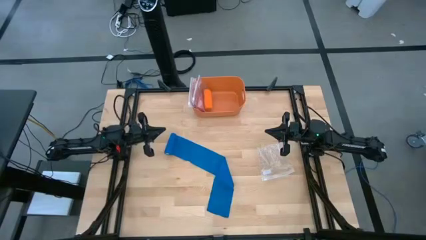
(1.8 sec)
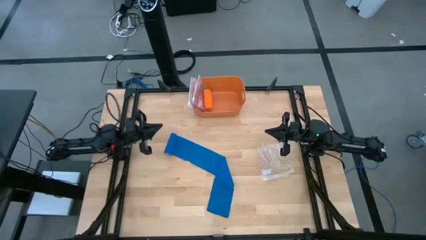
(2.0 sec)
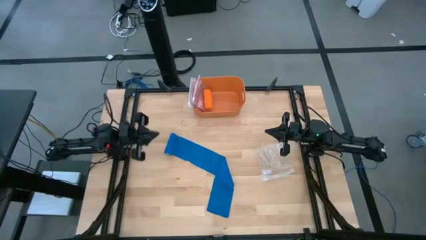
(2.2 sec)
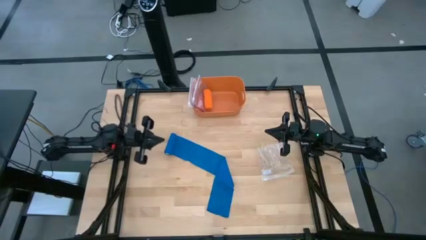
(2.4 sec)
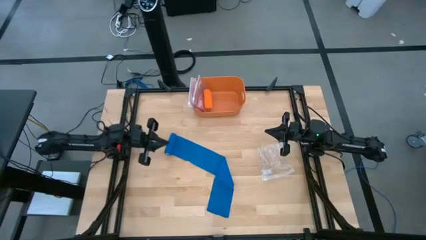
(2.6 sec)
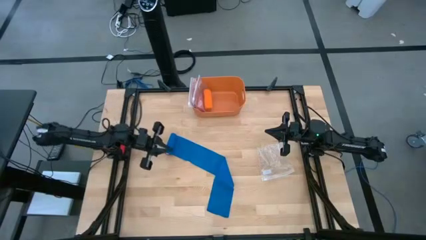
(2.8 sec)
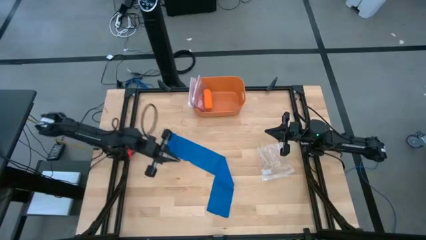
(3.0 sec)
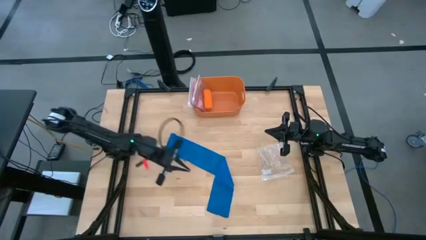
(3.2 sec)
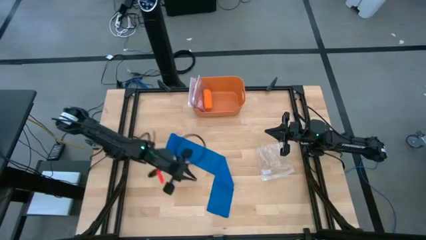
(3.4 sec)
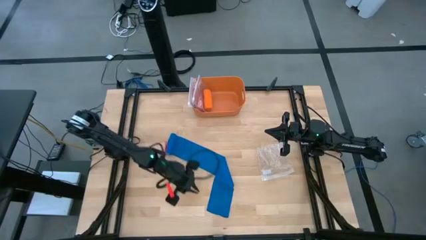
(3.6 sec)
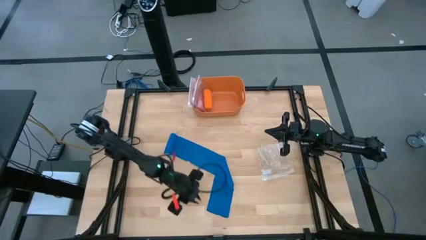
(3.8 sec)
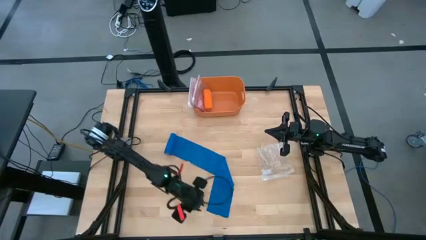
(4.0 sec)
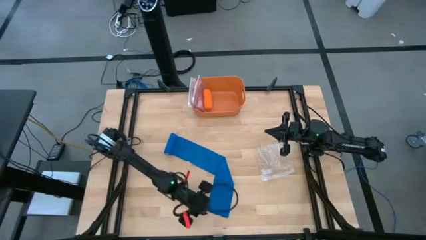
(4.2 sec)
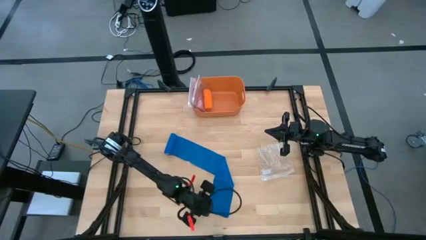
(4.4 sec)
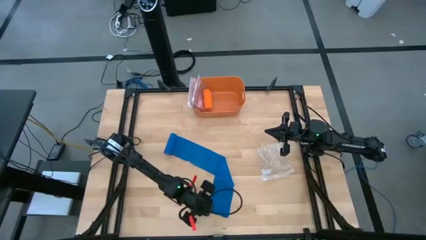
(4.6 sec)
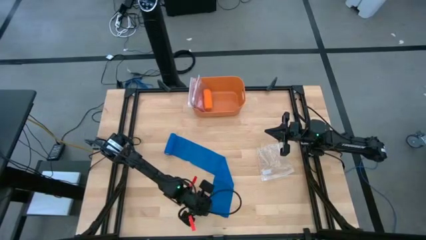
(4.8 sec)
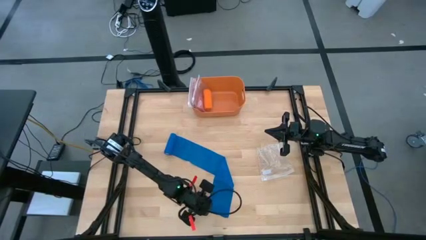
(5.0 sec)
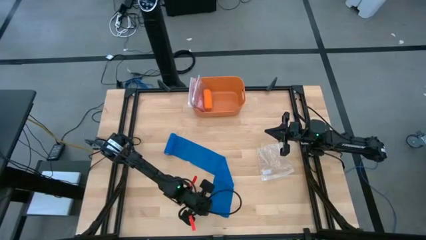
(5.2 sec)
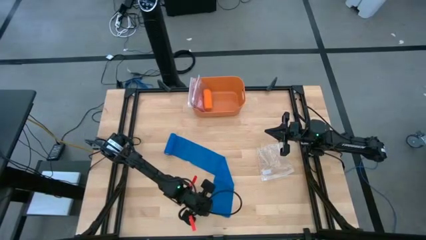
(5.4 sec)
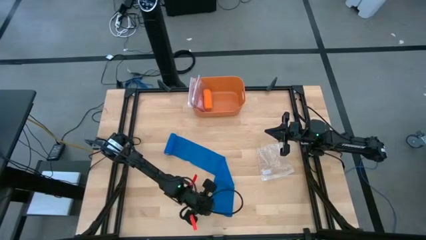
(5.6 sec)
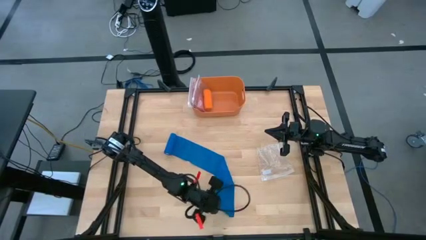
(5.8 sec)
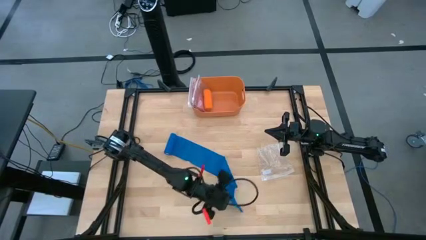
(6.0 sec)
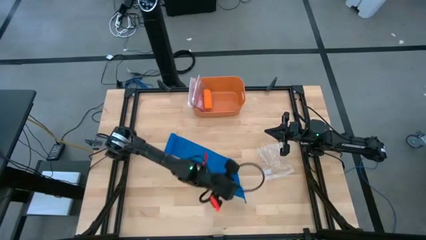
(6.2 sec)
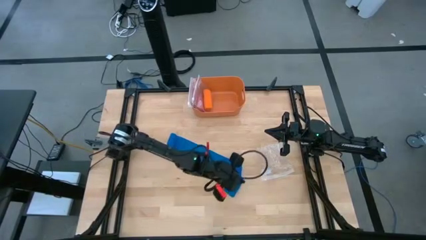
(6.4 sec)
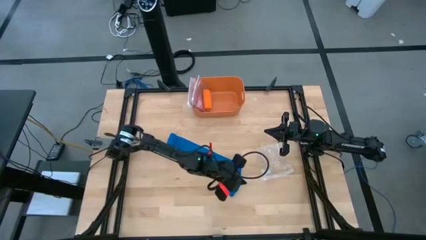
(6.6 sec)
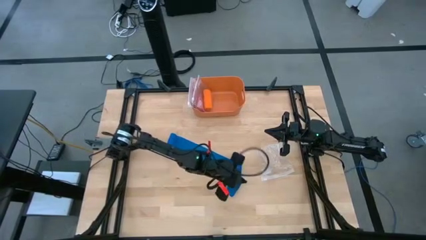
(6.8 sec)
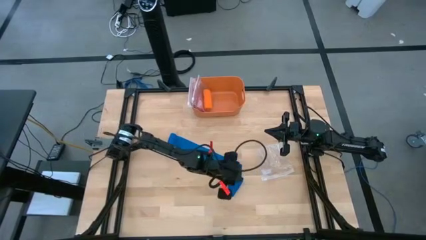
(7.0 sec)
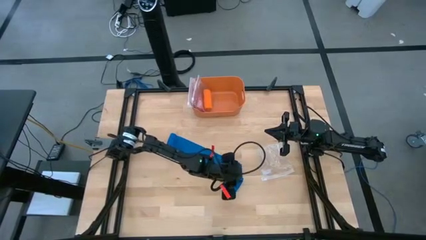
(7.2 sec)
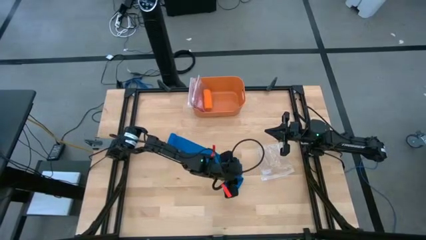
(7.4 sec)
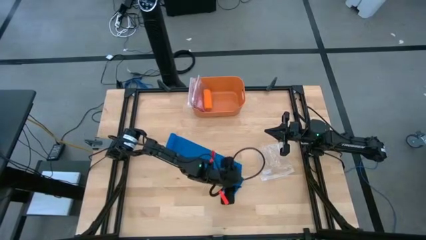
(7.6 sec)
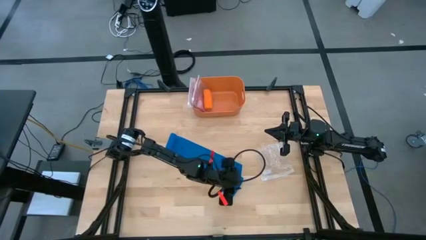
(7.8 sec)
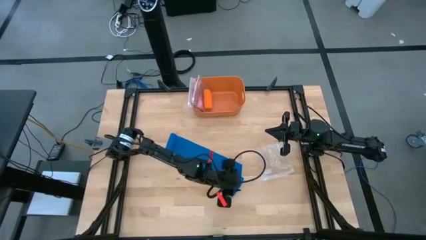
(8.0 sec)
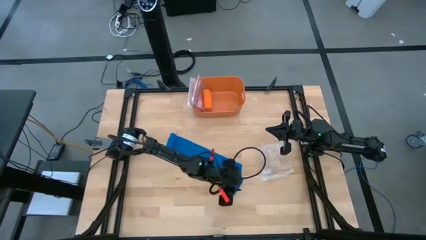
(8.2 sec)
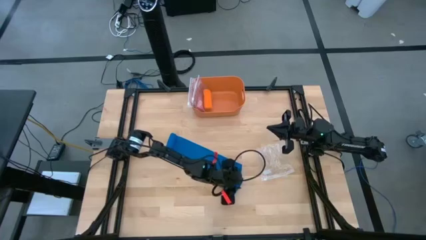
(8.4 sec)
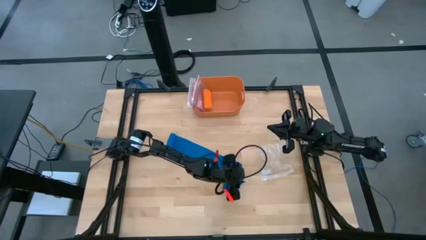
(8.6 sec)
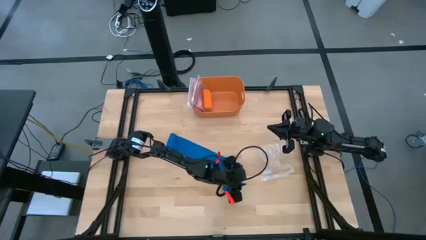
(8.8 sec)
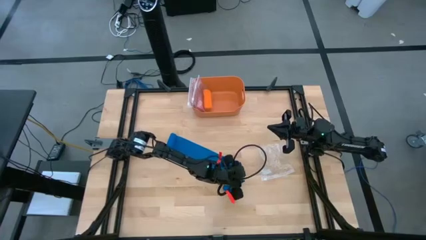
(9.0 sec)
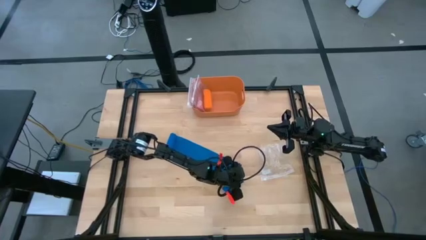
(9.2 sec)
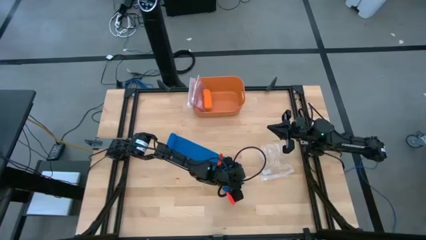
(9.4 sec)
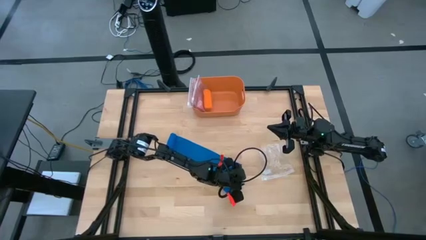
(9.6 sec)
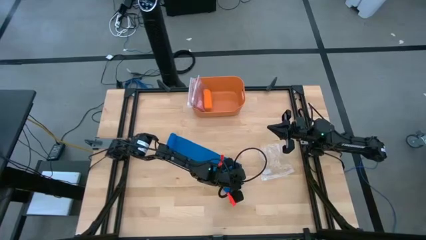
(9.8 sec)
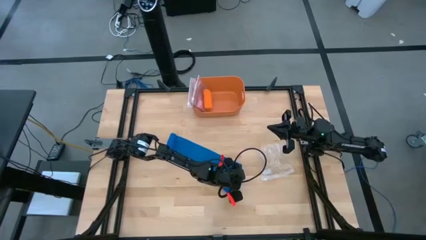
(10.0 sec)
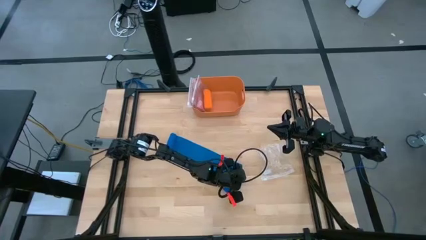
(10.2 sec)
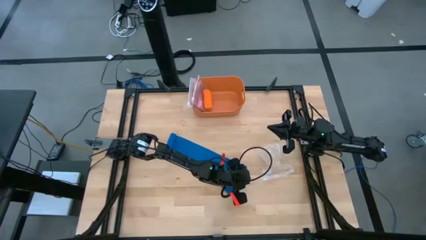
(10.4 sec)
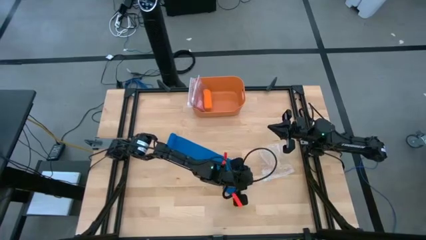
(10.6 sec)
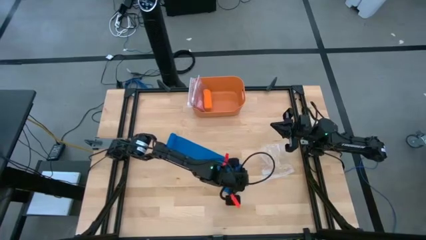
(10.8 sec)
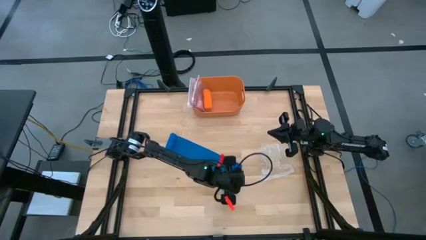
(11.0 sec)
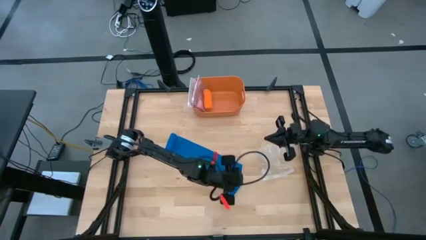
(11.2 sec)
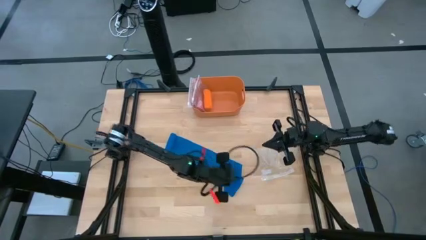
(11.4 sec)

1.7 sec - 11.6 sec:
Task: Roll bandage
Roll the blue bandage
